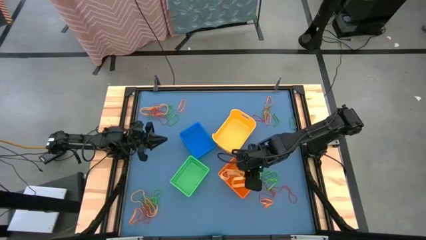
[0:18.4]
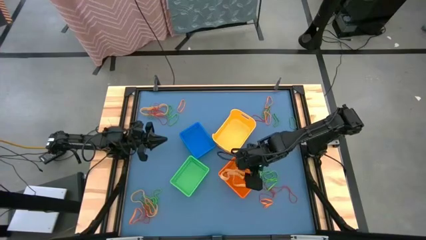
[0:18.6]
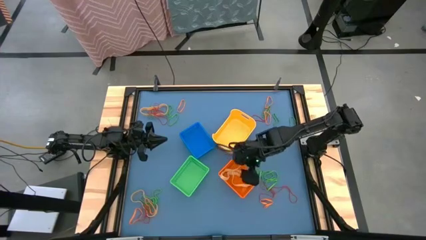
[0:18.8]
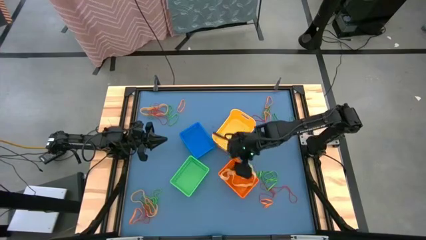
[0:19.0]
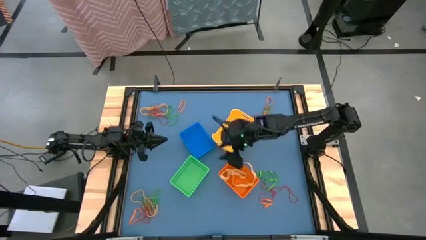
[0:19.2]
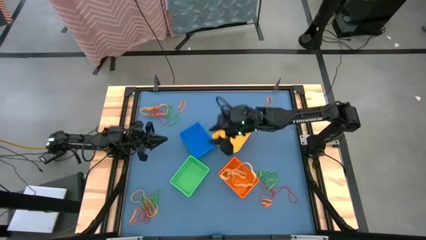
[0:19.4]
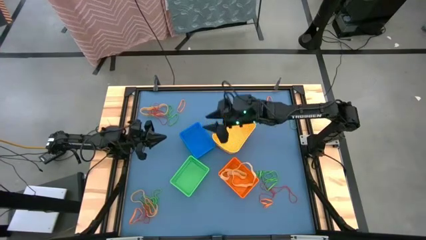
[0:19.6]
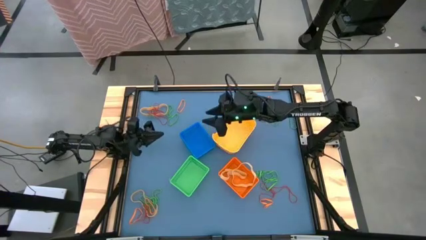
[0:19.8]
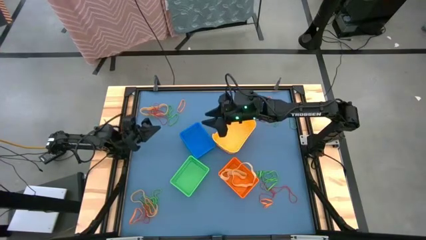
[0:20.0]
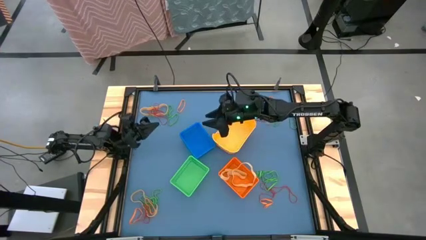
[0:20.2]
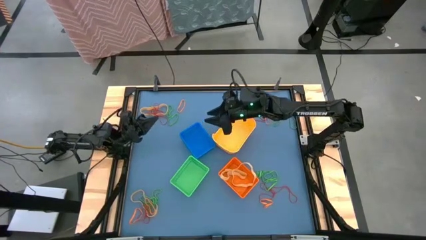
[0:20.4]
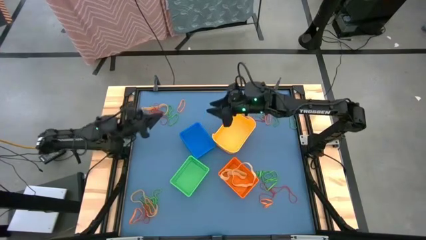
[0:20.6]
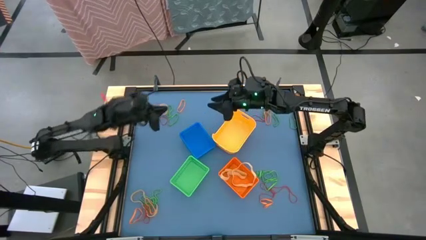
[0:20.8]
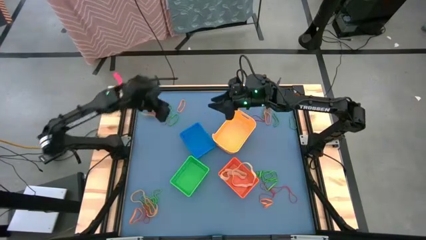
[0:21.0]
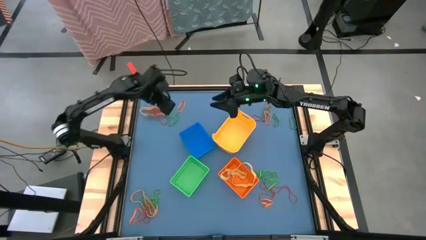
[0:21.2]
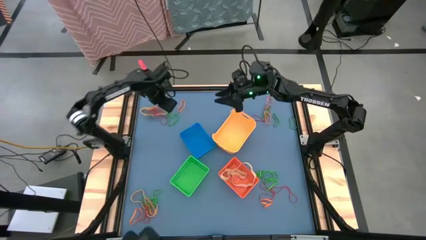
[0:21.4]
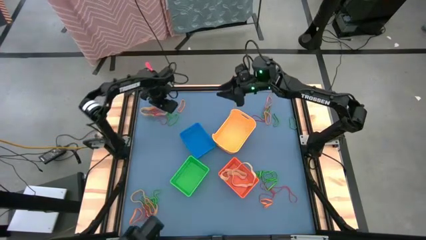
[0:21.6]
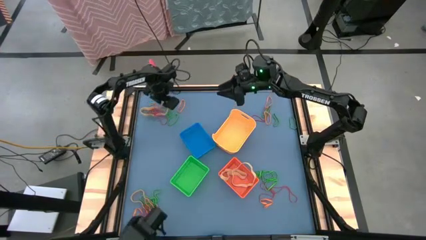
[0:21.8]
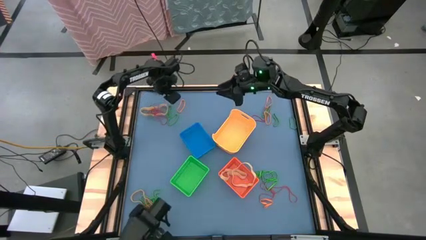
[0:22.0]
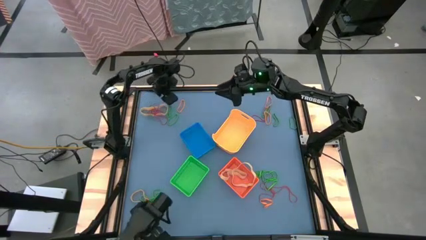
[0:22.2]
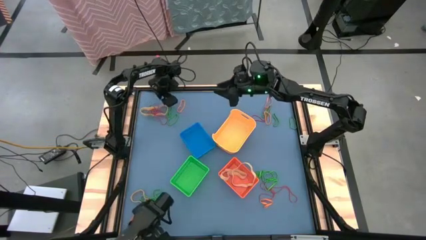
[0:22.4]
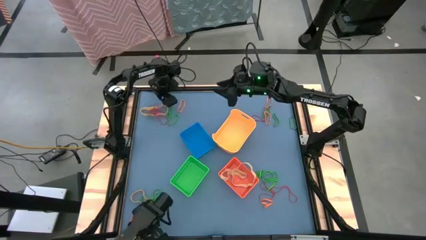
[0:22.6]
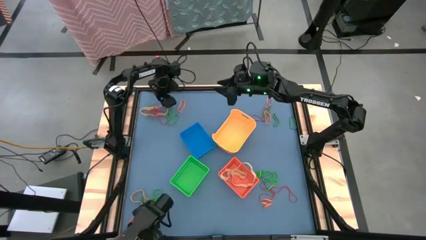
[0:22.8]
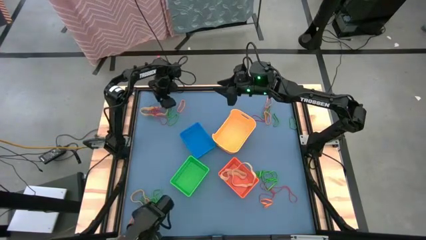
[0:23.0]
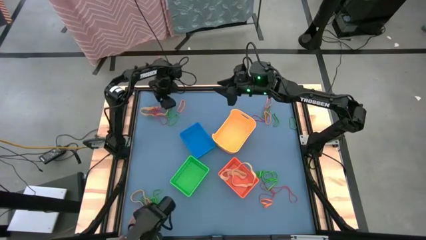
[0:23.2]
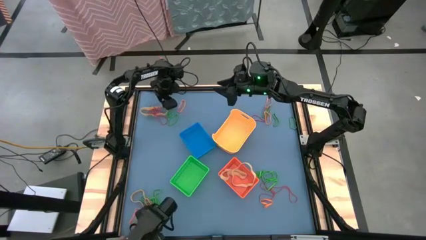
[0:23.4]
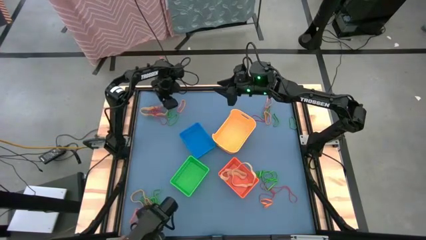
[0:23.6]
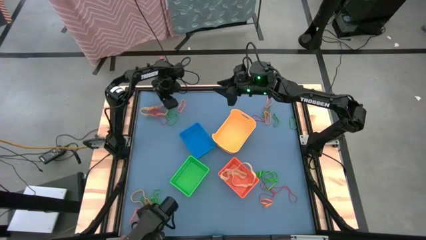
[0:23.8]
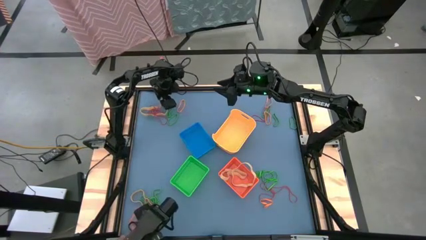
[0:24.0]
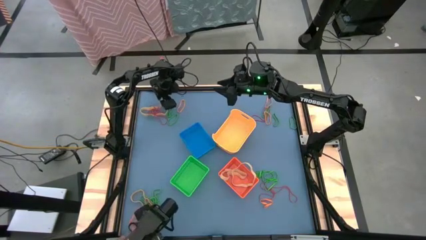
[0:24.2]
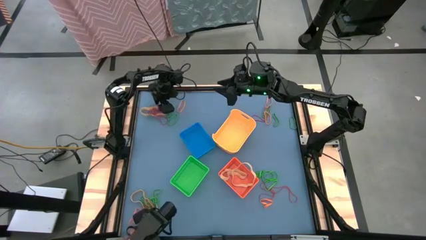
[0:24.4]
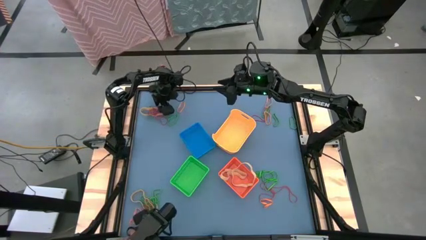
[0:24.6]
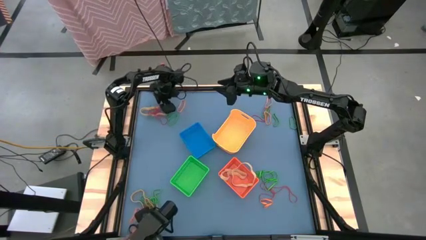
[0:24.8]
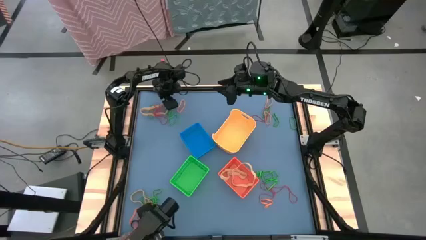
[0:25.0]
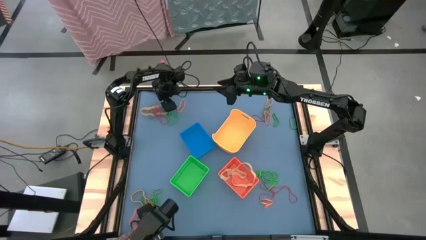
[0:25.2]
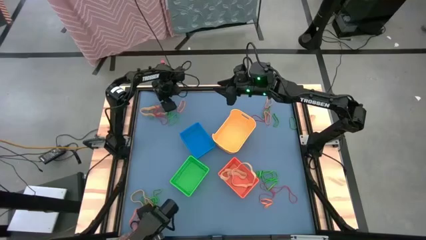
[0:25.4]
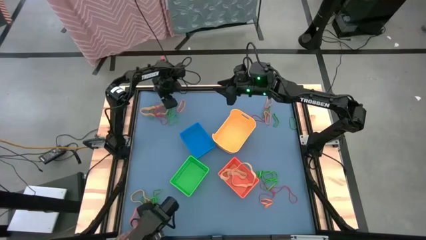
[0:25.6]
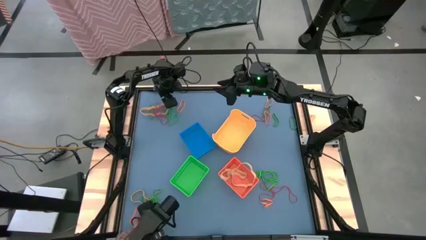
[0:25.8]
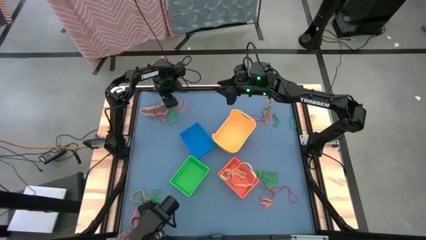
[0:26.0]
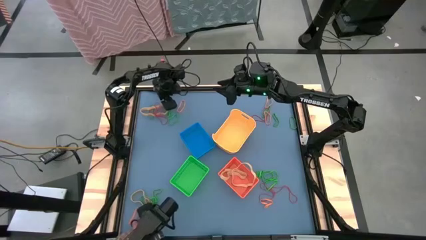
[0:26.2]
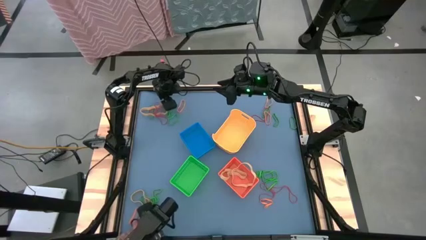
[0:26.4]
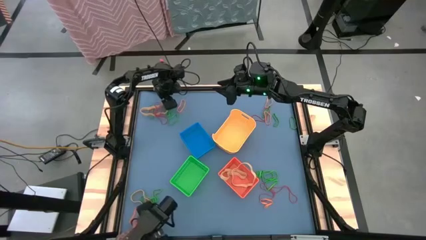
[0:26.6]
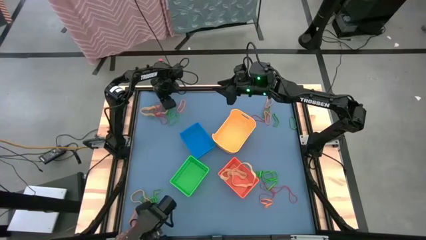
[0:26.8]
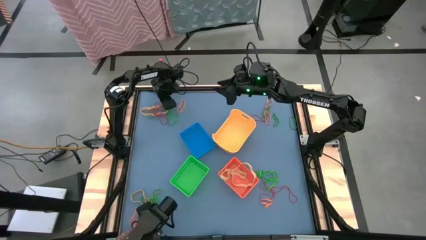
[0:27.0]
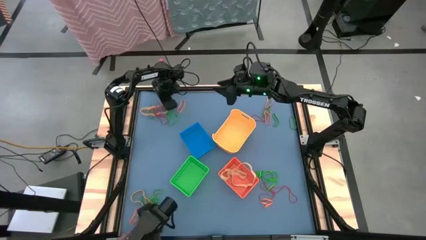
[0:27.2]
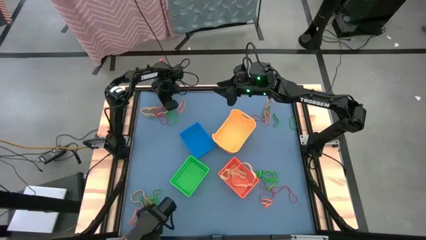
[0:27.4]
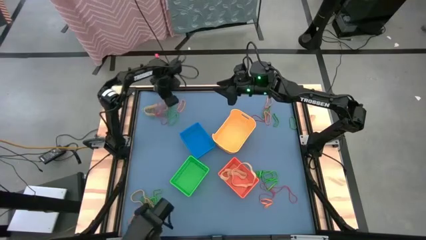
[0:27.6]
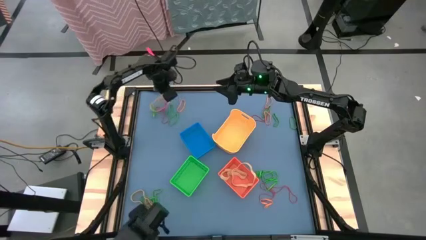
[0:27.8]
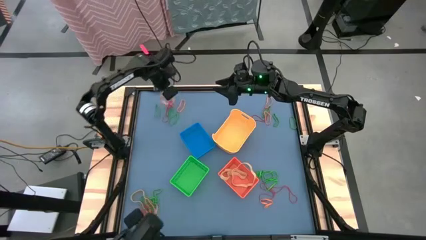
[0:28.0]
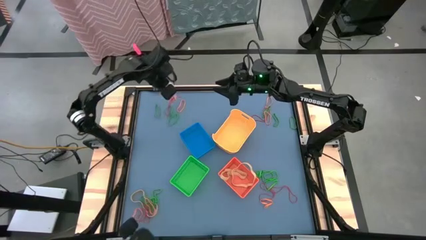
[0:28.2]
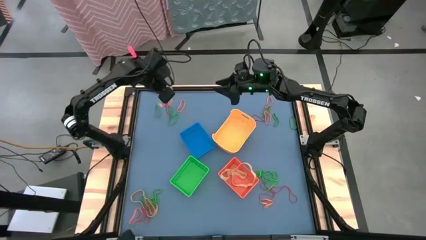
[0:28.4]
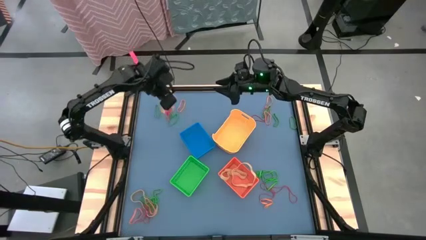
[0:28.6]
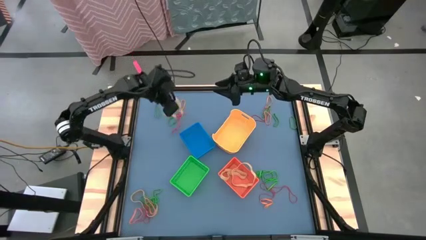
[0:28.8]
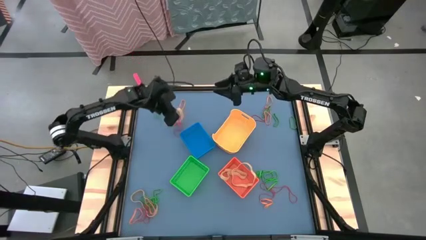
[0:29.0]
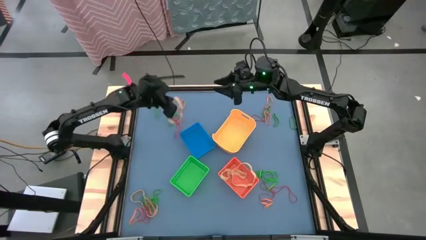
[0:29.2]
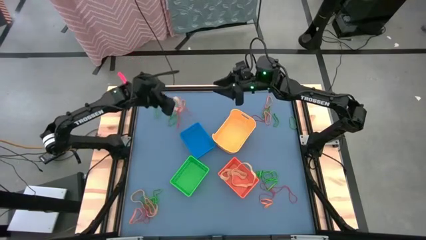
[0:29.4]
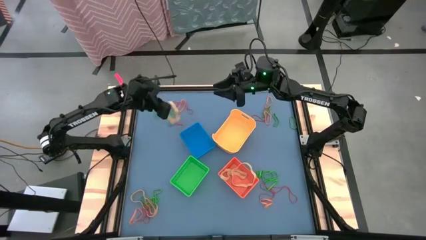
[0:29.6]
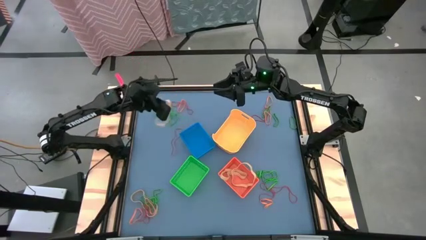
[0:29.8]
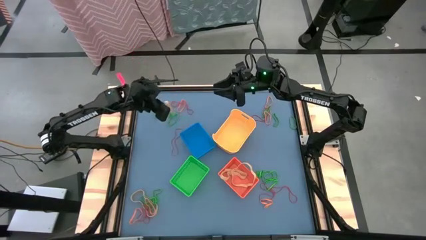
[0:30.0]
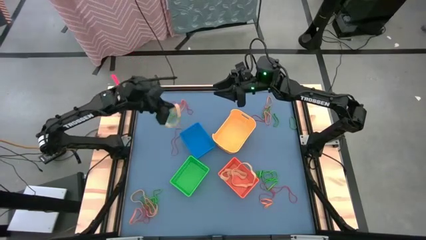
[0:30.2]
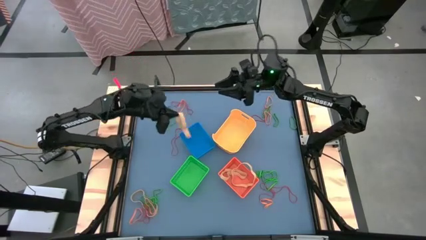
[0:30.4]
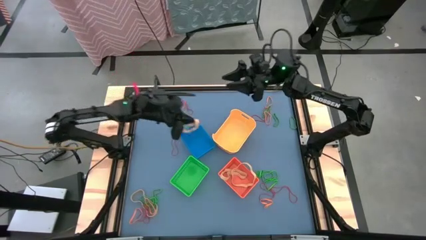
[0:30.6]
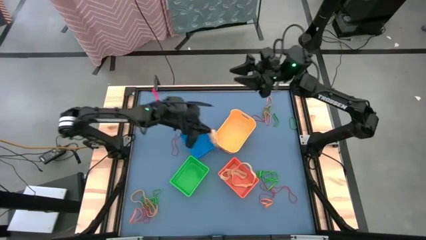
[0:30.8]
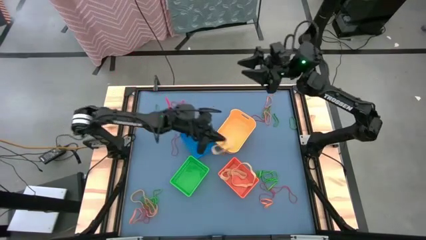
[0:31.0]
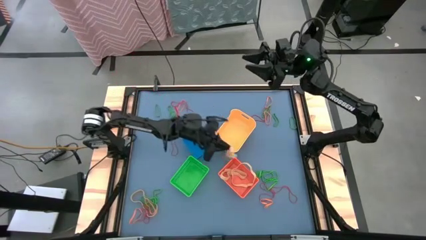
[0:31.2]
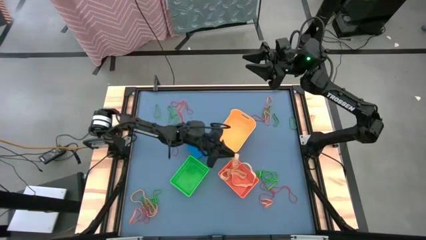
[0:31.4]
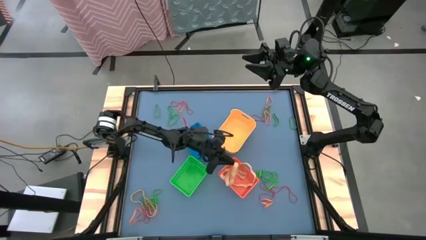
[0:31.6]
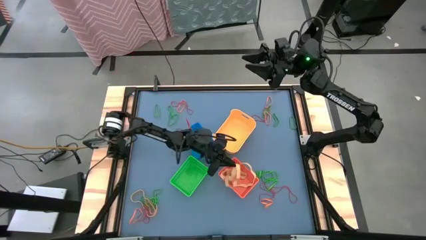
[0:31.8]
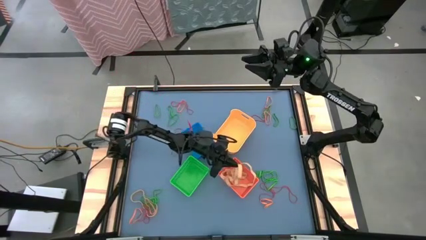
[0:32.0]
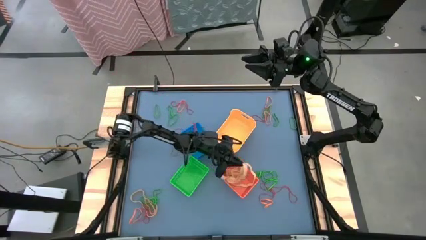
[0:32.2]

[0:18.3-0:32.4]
Task: Sort rubber bands into baskets
Put the yellow rubber band into the orange bin

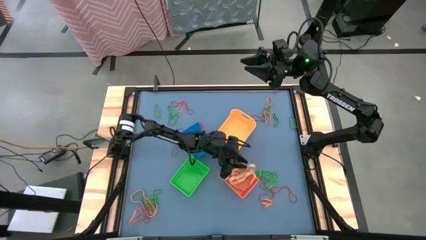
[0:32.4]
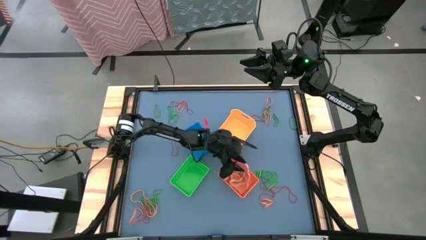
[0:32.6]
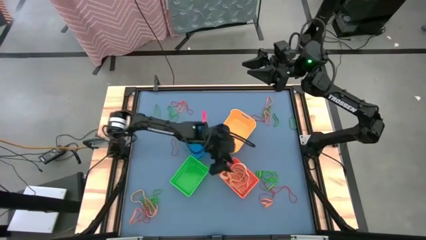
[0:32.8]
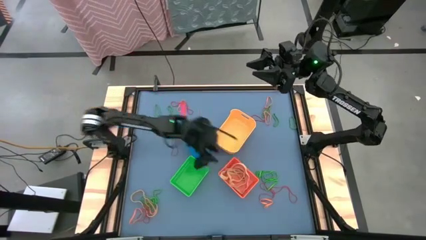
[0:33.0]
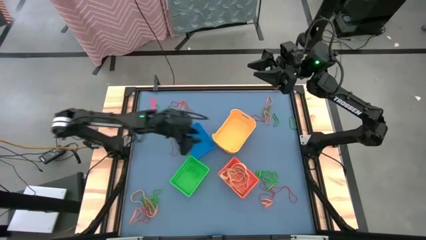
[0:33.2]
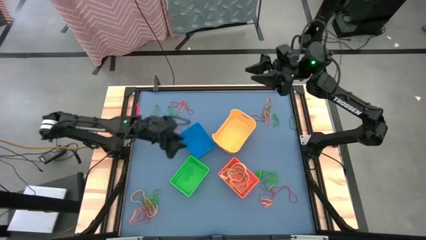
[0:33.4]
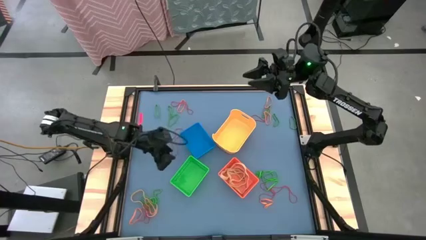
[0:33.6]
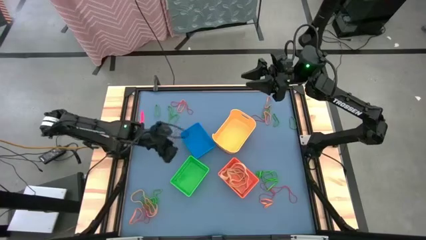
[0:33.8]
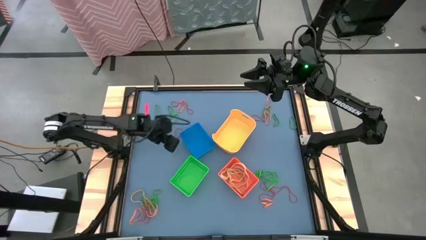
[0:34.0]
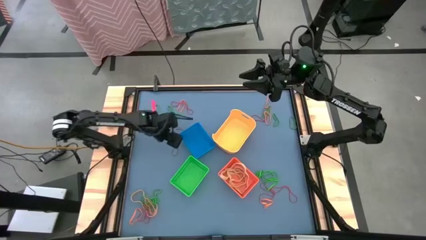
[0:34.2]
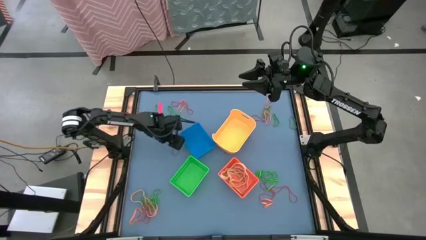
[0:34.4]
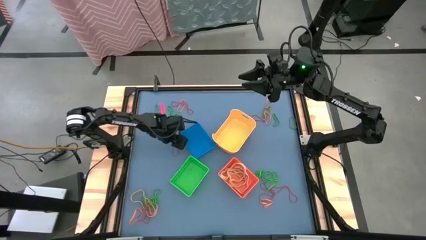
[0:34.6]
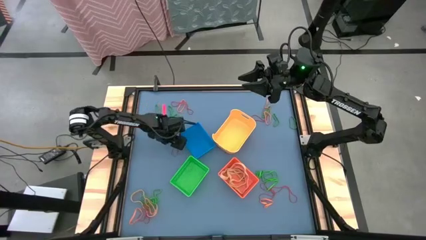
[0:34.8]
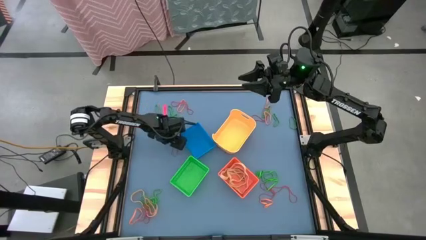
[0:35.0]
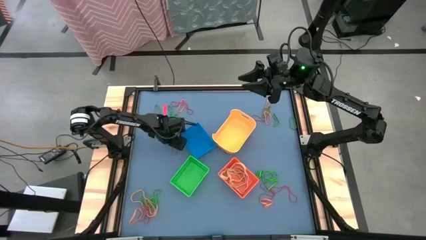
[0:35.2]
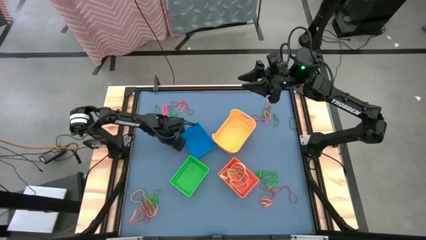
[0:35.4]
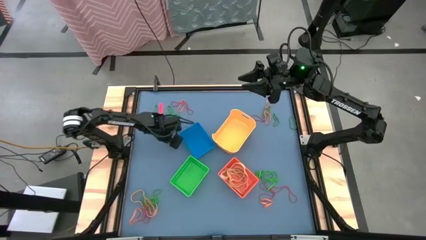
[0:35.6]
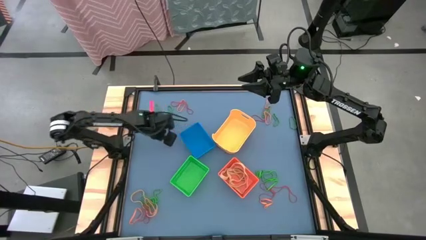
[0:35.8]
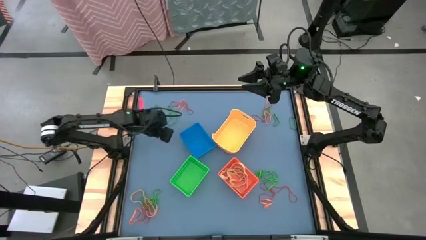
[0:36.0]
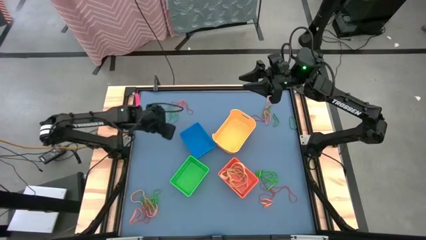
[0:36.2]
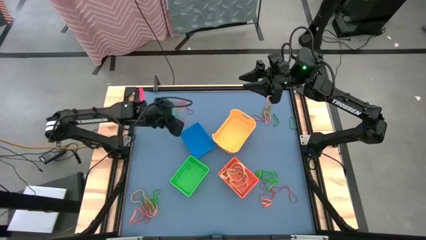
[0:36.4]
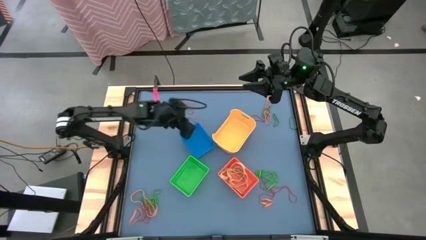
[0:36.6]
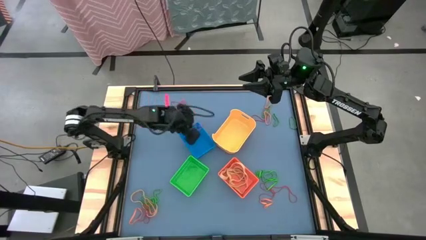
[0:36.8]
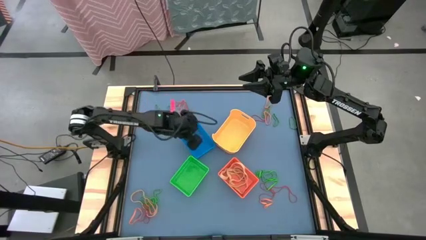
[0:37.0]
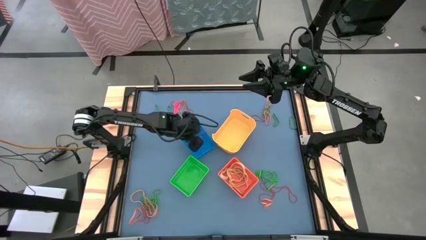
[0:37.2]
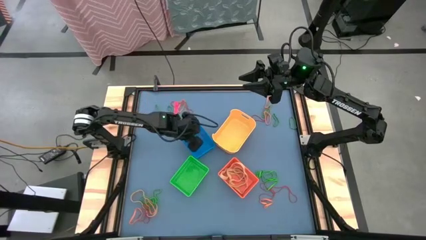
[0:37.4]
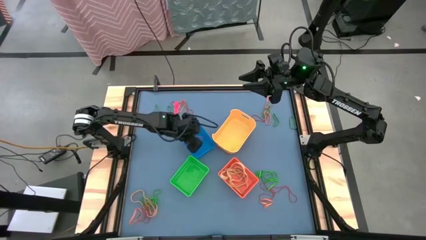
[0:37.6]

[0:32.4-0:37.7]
Put the red rubber band into the blue bin
